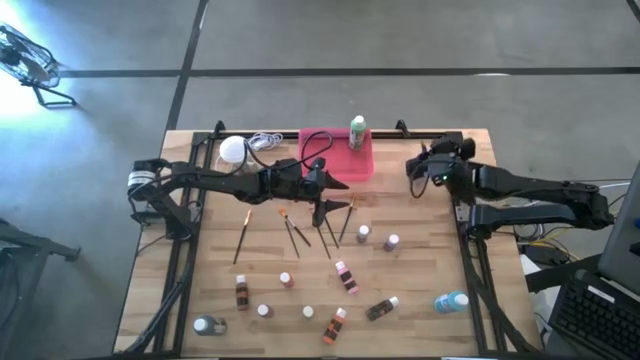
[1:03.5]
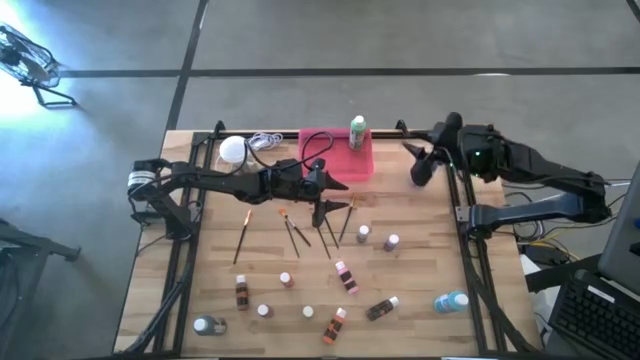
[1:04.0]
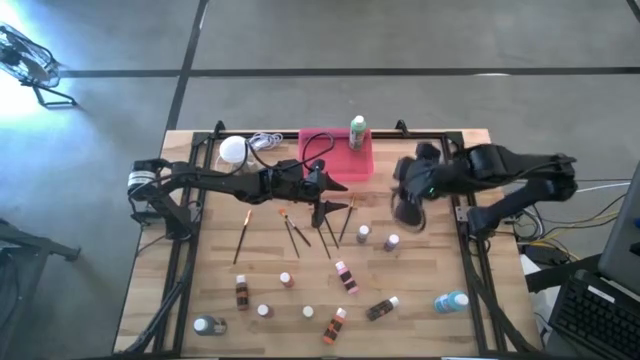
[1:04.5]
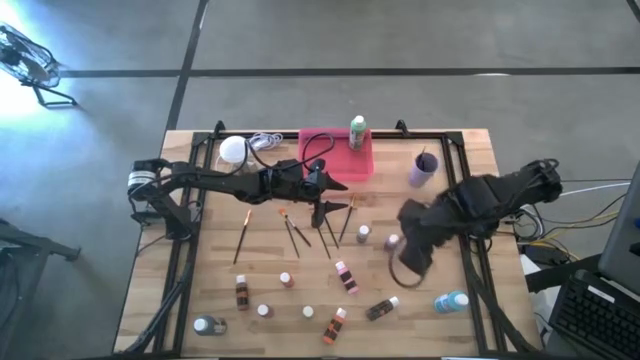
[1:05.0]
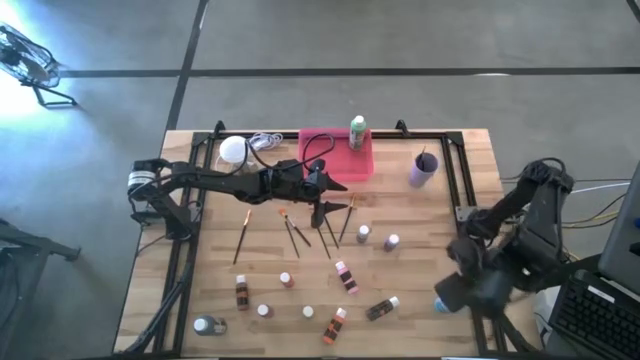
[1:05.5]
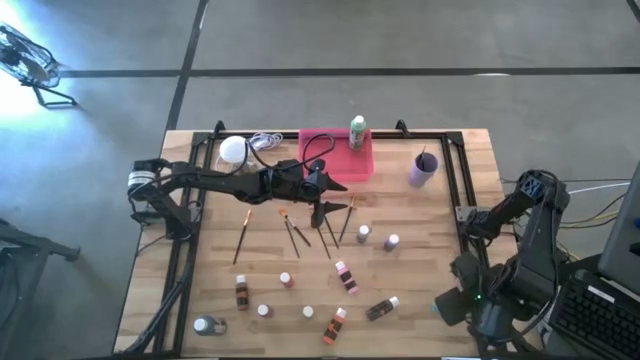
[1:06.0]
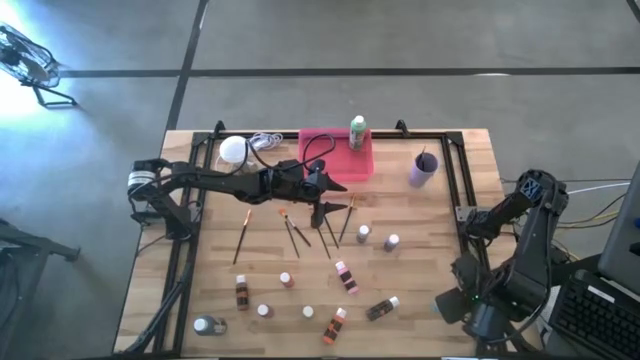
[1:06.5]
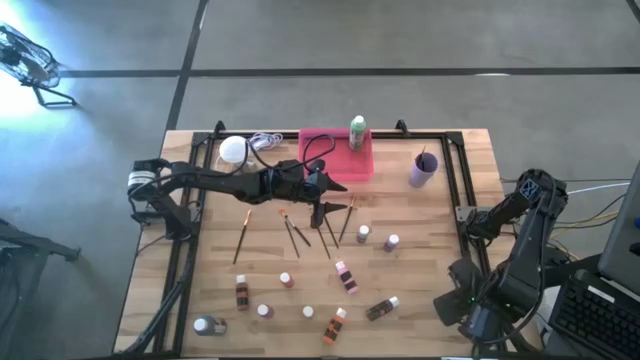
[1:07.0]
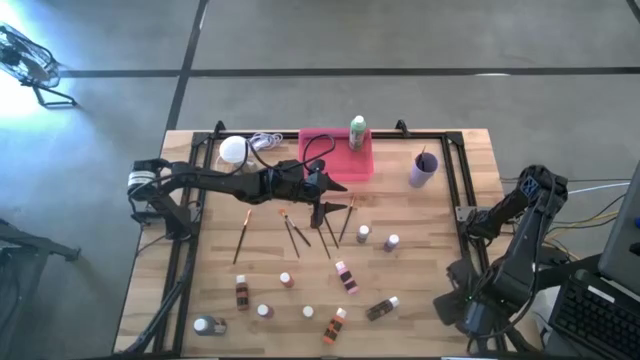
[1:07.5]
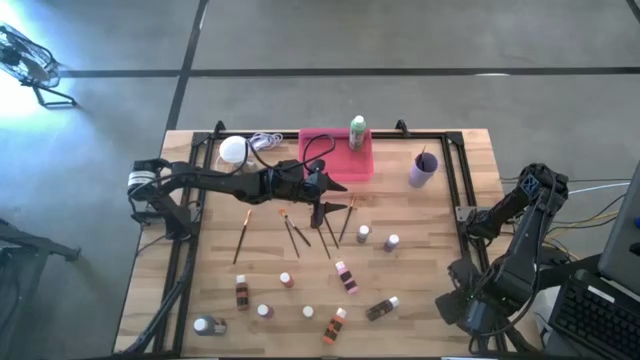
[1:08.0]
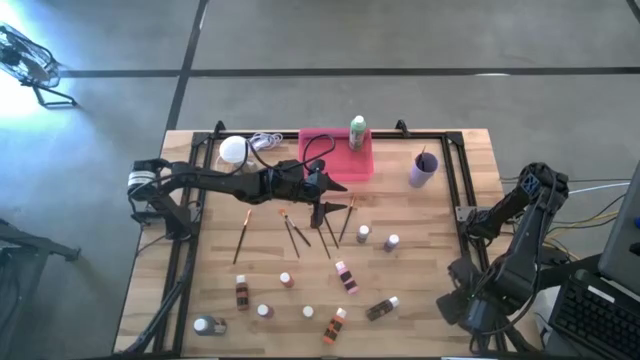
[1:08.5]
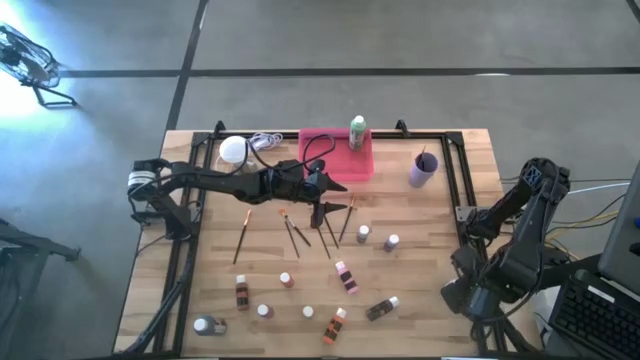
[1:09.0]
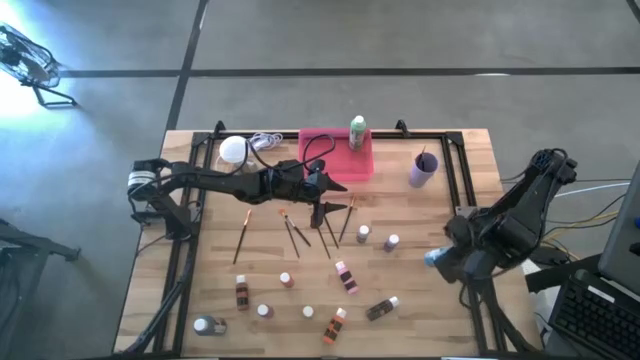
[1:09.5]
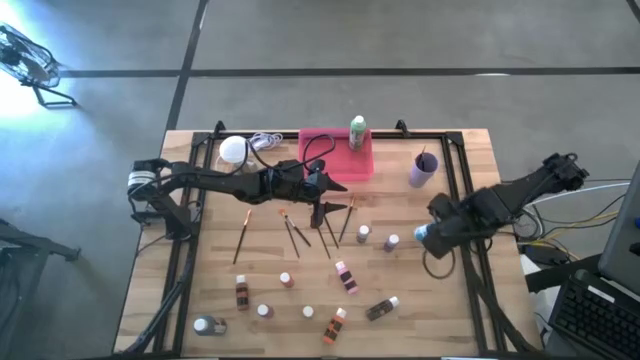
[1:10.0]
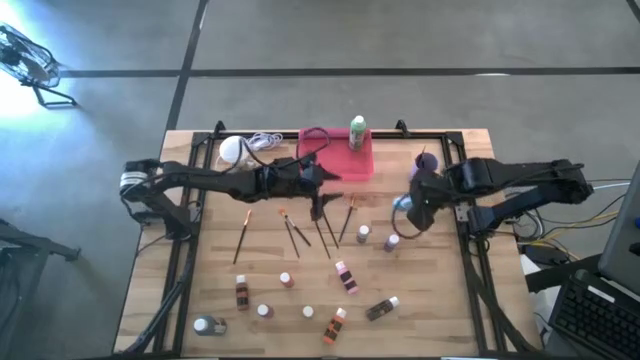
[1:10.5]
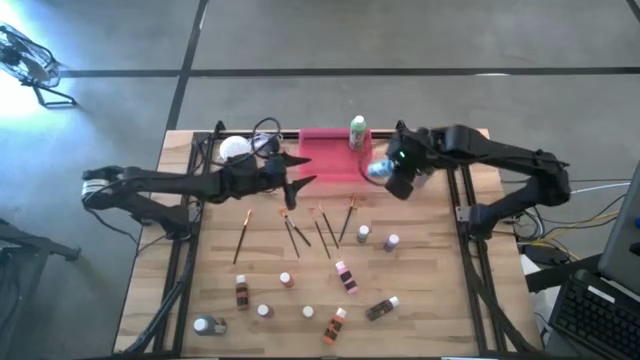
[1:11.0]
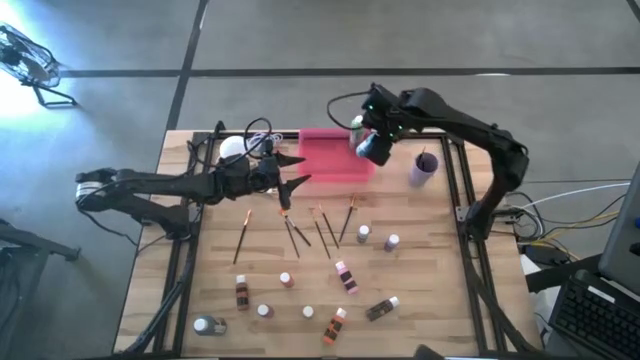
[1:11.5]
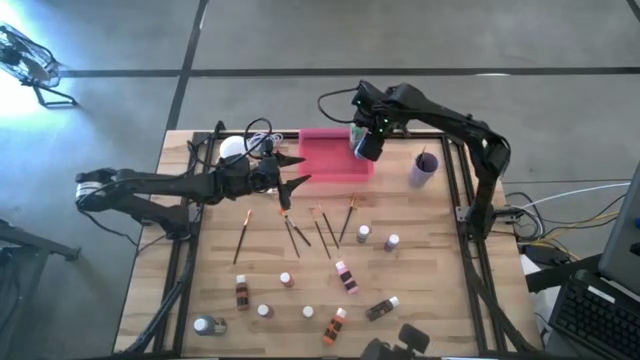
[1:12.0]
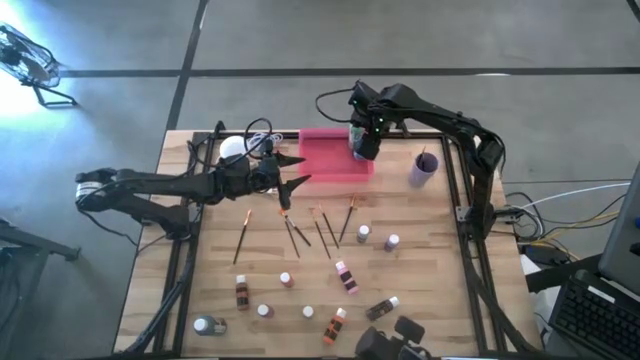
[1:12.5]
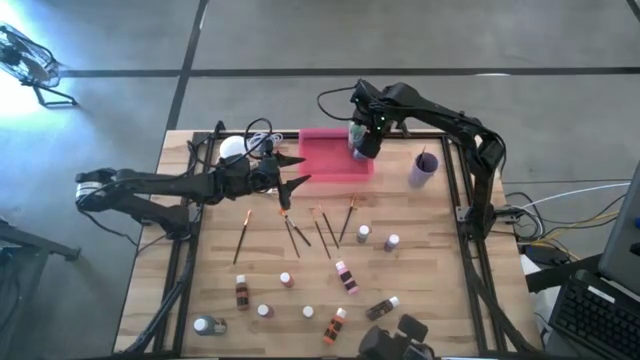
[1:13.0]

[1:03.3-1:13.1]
Task: Pick & Place Paint Supplies
Put the blue paint bottle into the pink bin

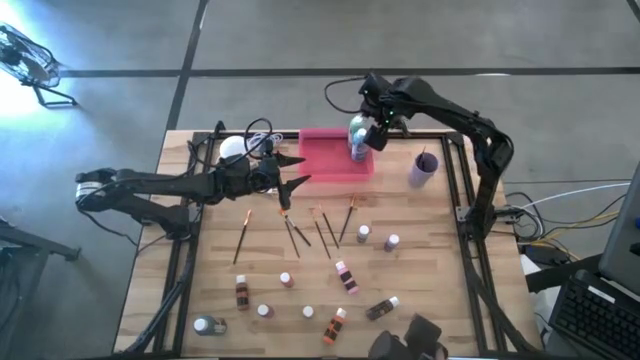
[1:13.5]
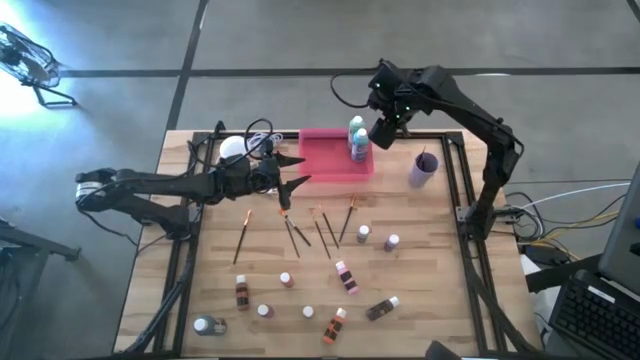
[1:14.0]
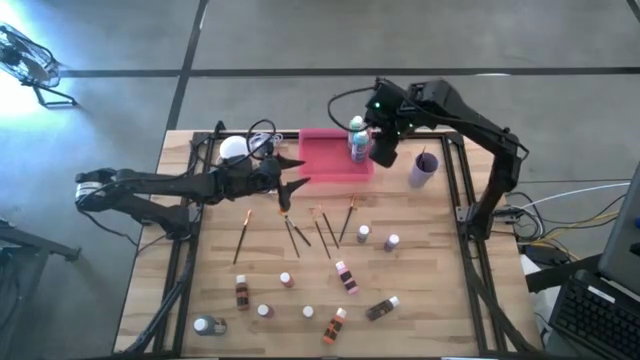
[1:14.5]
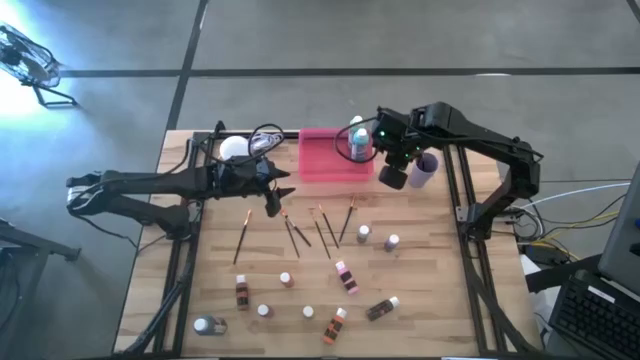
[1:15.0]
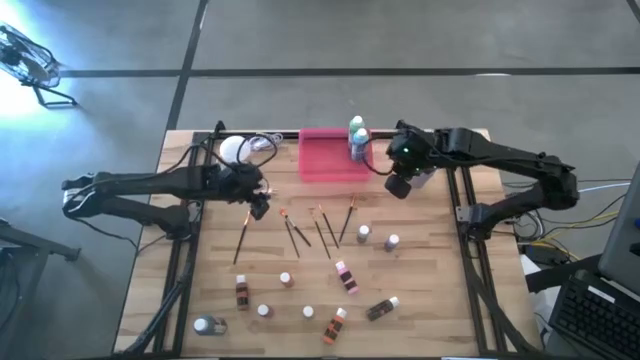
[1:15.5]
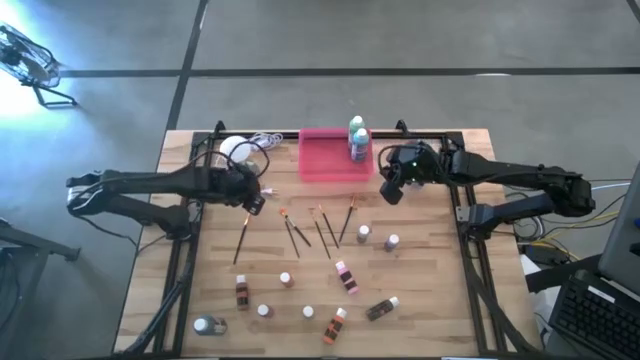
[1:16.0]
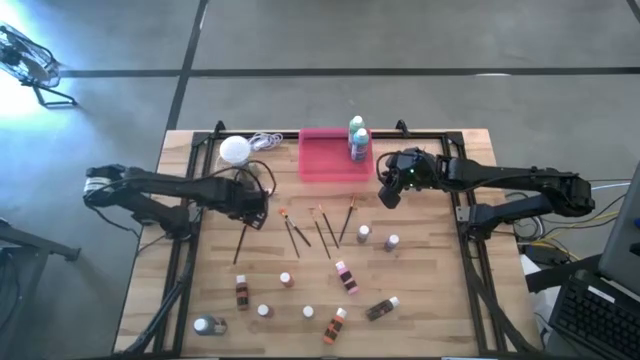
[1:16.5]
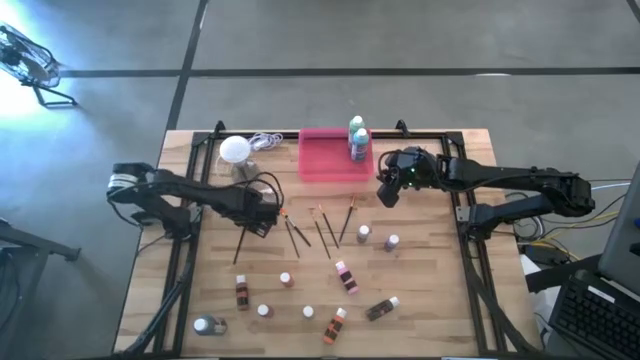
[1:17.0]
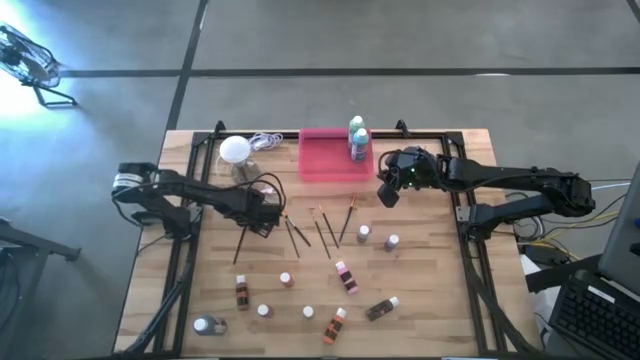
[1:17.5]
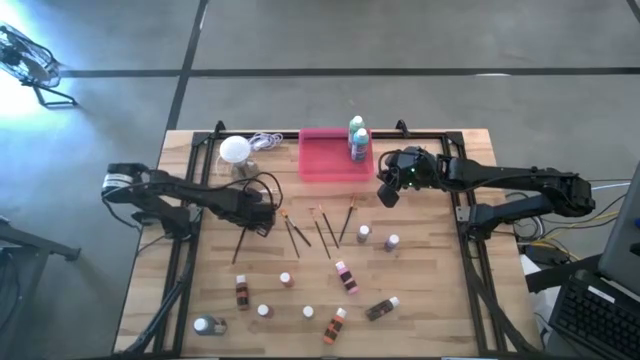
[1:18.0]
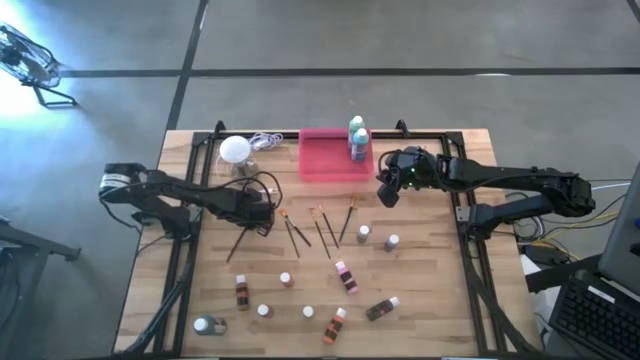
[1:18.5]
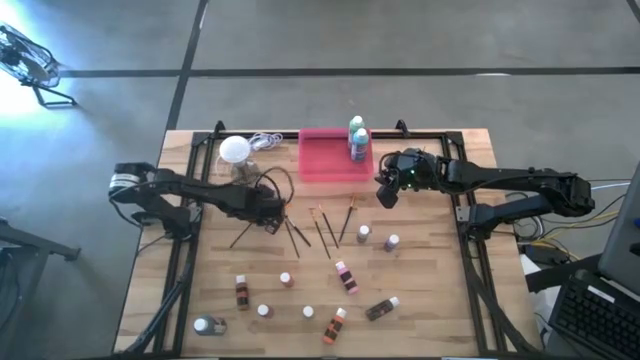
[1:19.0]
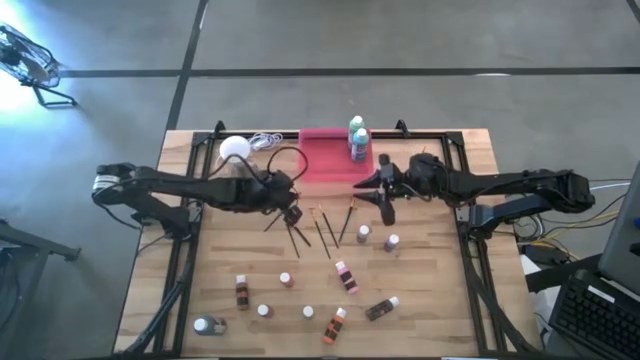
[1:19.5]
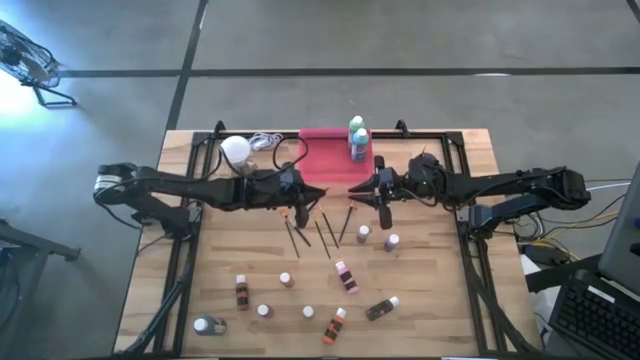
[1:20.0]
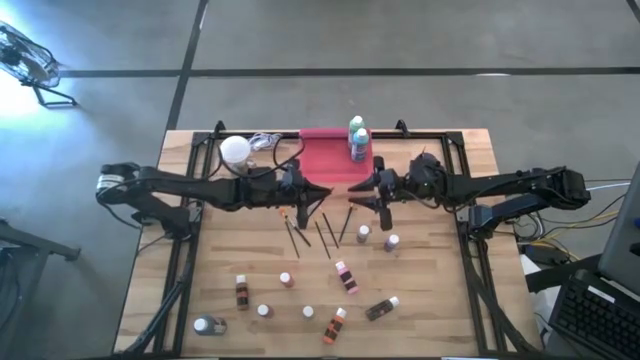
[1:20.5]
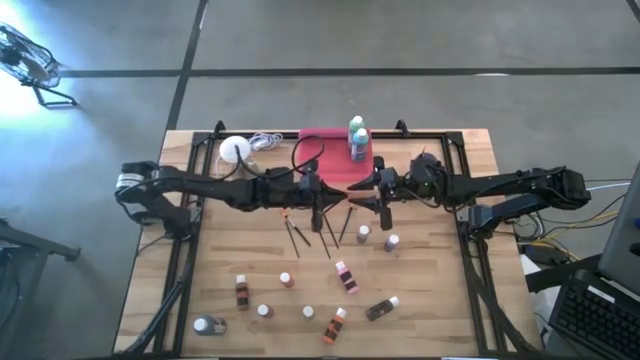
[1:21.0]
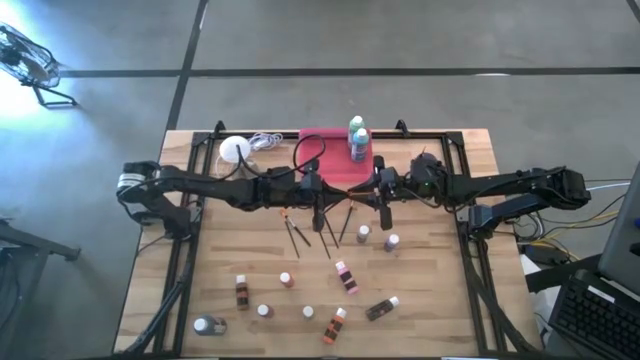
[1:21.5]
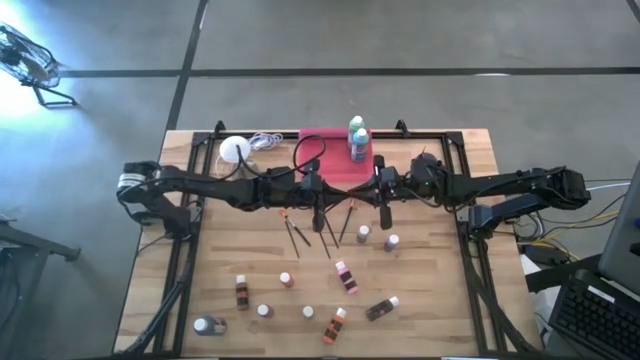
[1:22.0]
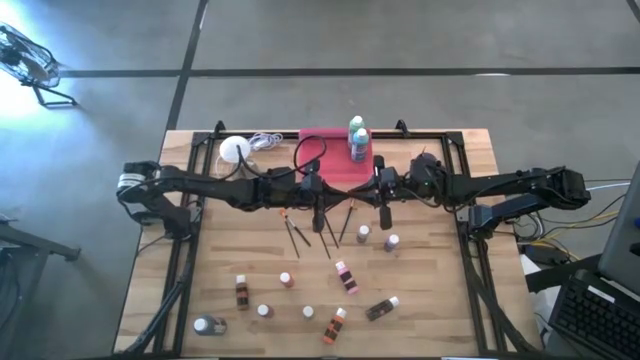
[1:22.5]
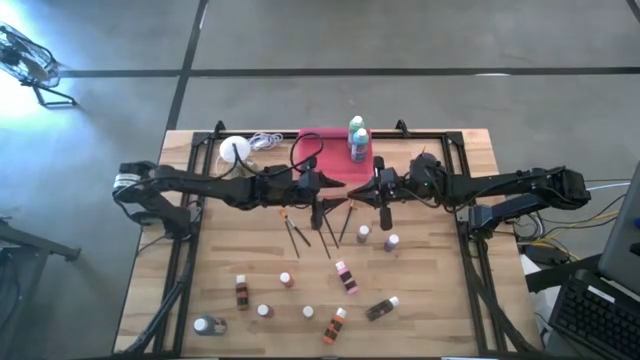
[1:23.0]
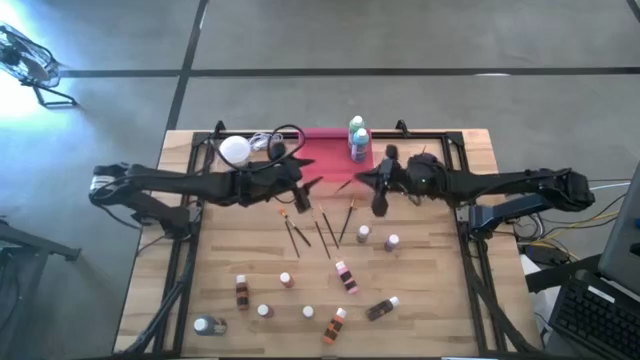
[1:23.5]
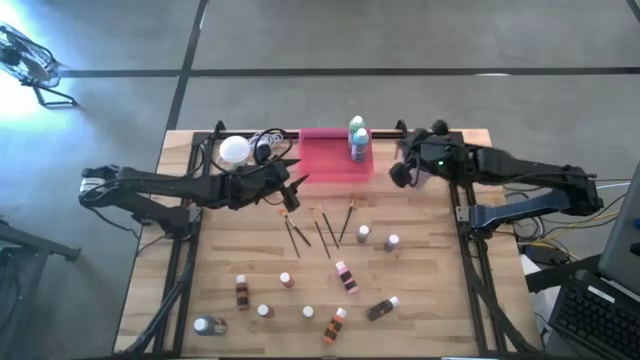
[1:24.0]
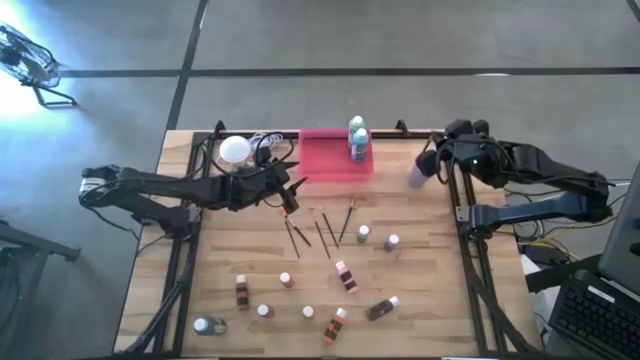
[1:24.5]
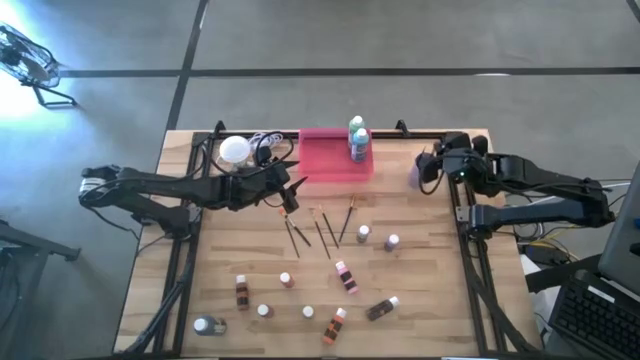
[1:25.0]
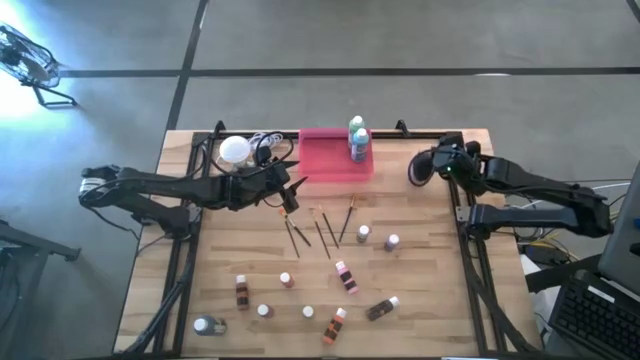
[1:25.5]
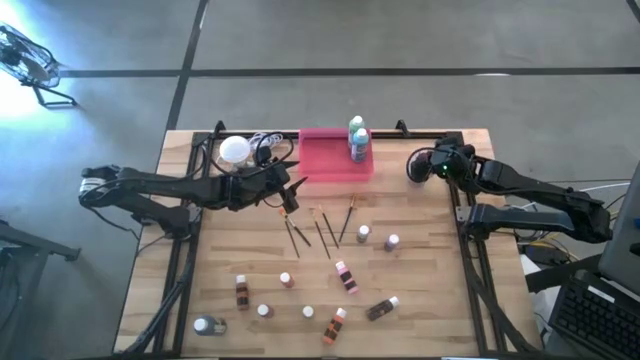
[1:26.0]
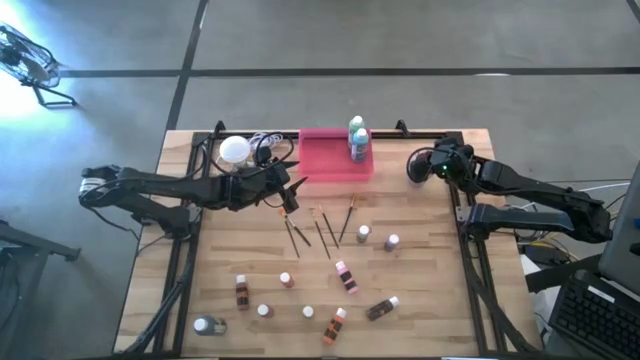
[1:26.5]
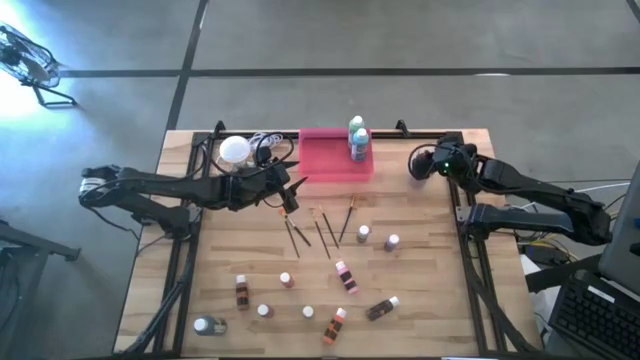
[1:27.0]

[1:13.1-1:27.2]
Put the black gold paint brush into the violet cup
